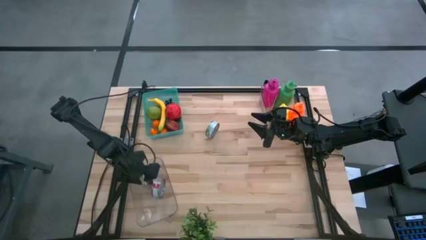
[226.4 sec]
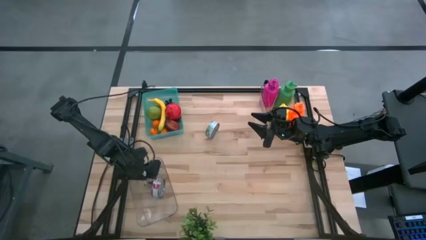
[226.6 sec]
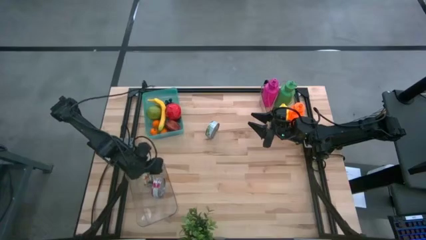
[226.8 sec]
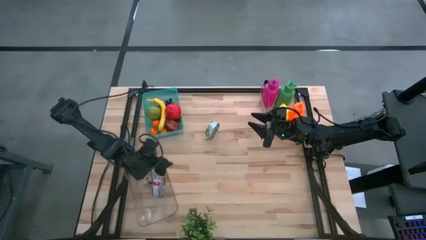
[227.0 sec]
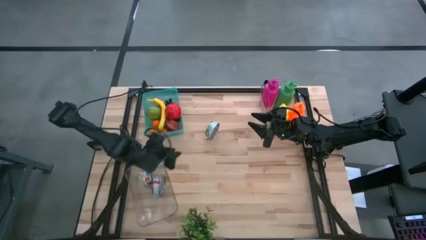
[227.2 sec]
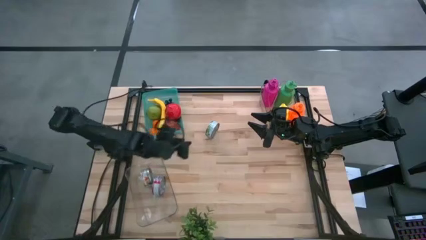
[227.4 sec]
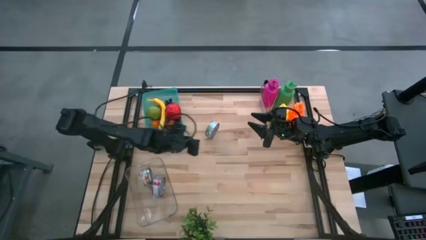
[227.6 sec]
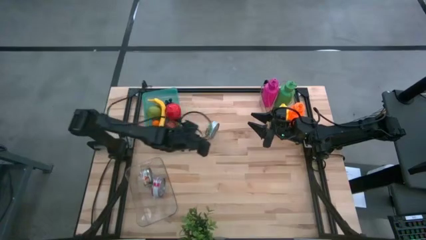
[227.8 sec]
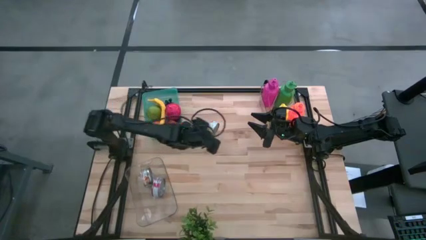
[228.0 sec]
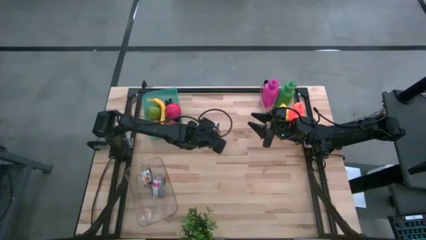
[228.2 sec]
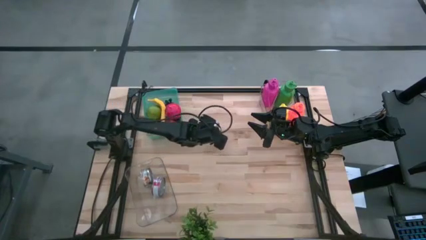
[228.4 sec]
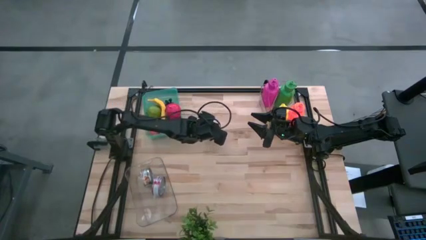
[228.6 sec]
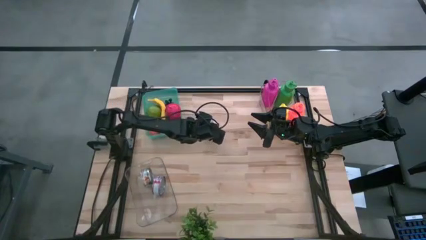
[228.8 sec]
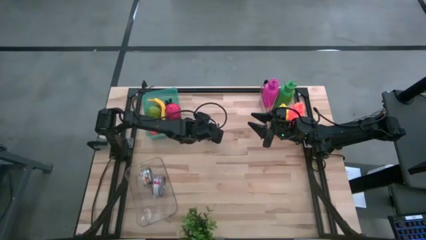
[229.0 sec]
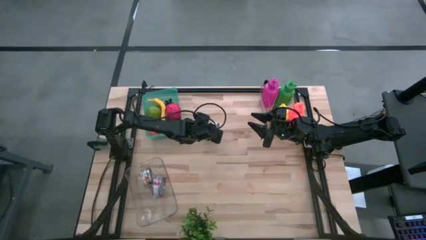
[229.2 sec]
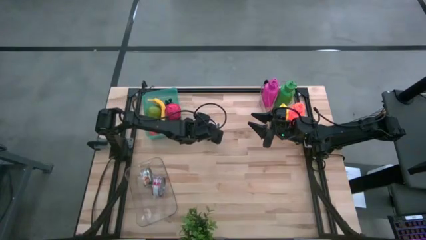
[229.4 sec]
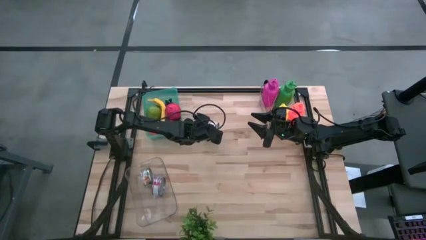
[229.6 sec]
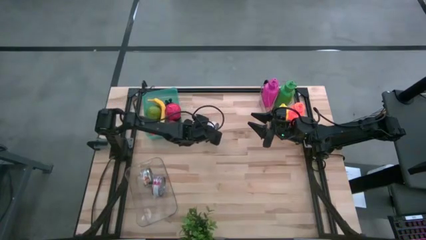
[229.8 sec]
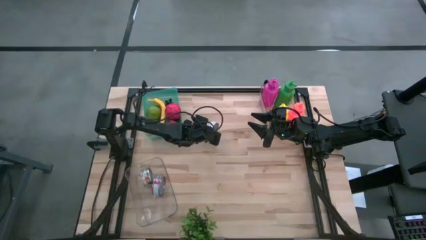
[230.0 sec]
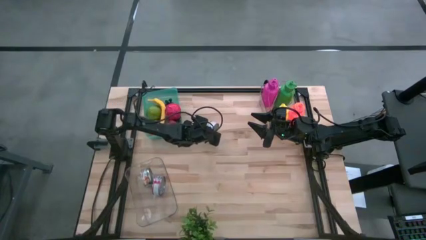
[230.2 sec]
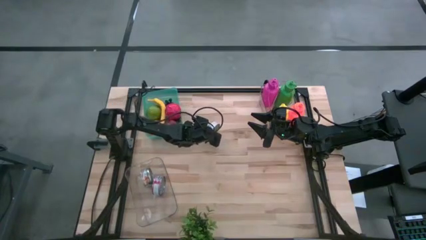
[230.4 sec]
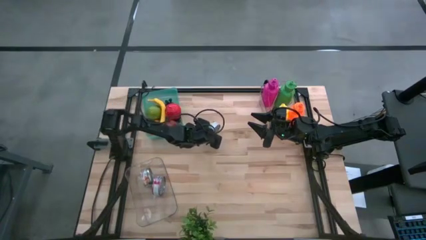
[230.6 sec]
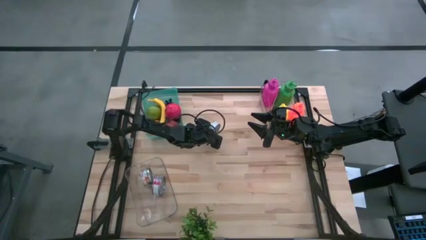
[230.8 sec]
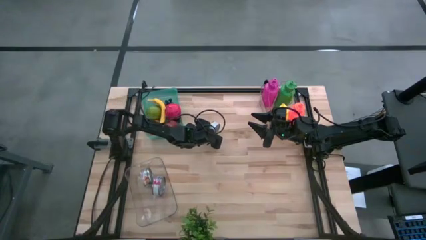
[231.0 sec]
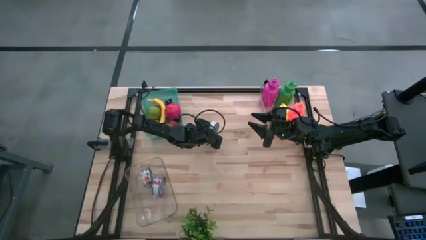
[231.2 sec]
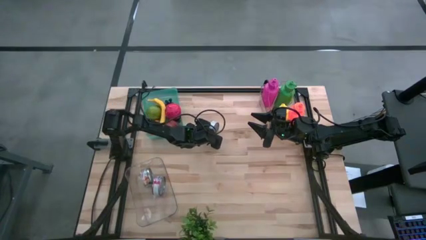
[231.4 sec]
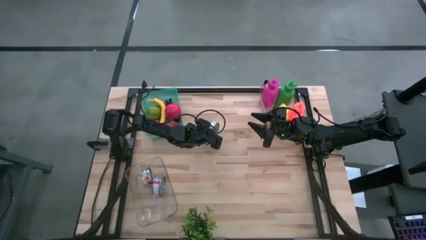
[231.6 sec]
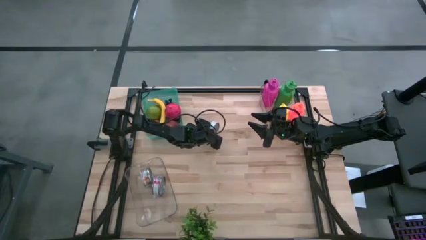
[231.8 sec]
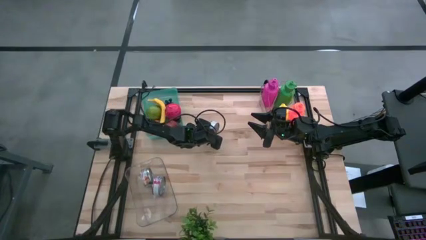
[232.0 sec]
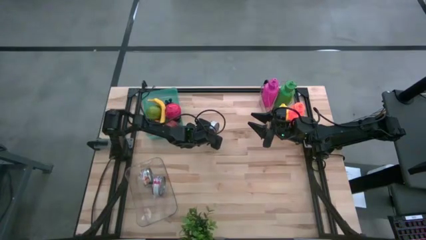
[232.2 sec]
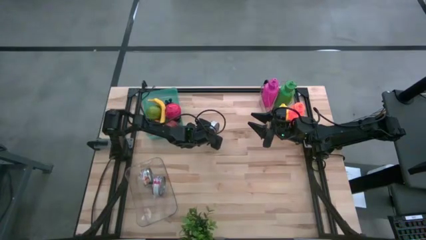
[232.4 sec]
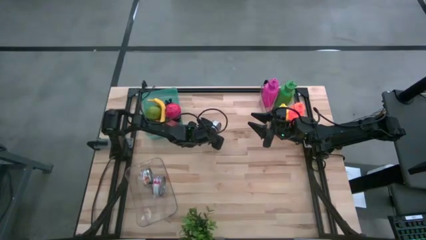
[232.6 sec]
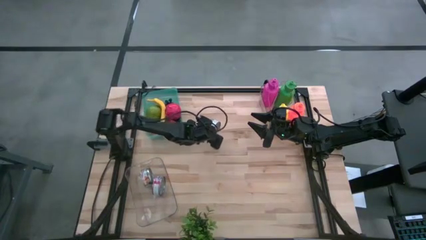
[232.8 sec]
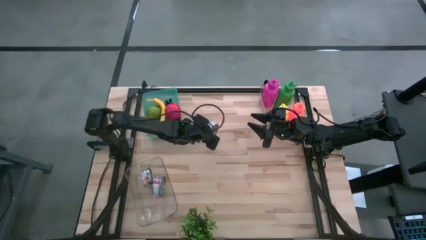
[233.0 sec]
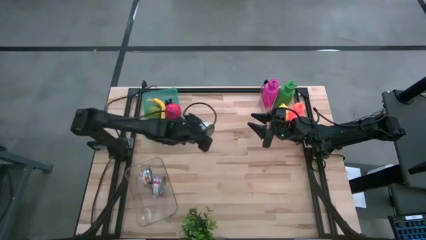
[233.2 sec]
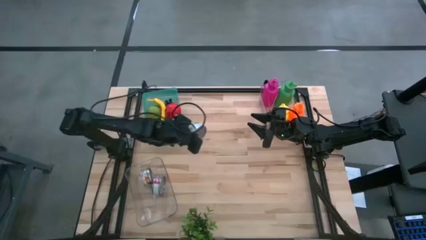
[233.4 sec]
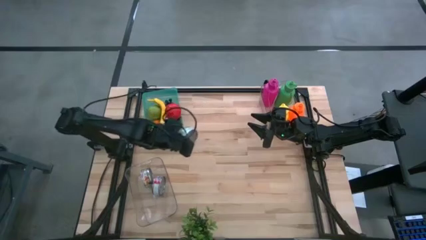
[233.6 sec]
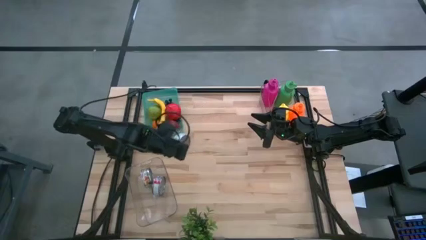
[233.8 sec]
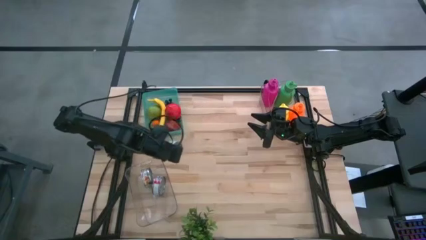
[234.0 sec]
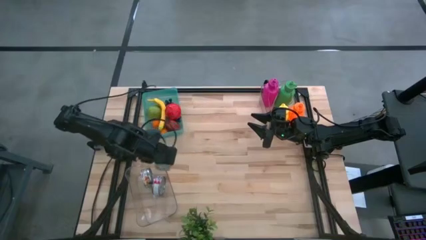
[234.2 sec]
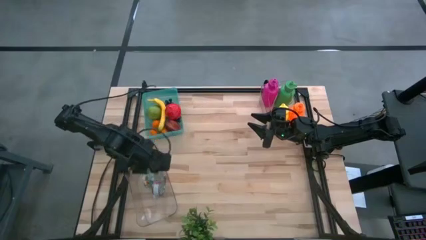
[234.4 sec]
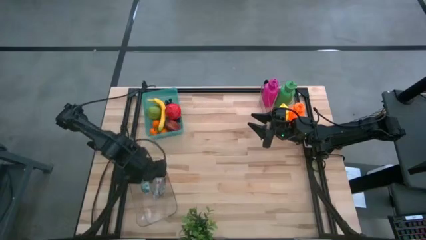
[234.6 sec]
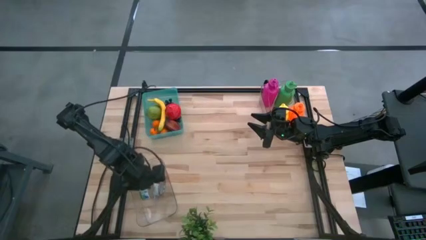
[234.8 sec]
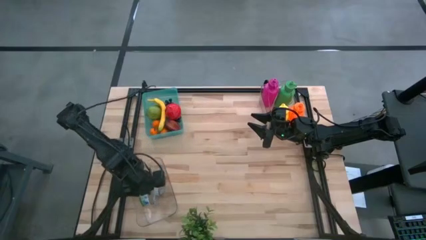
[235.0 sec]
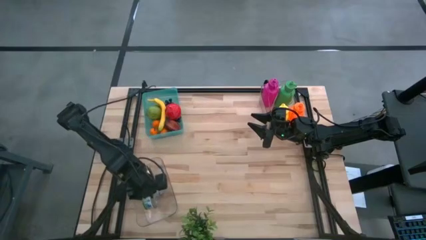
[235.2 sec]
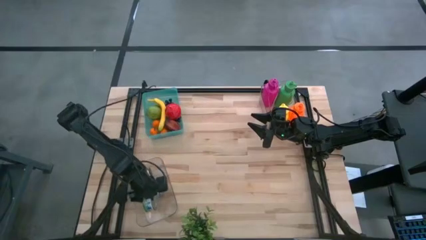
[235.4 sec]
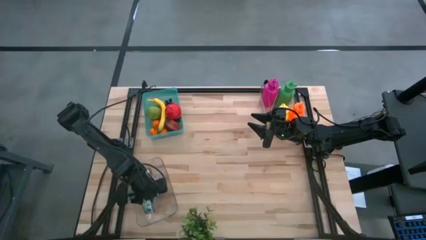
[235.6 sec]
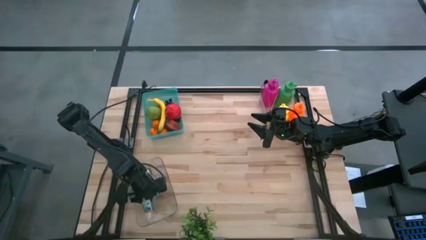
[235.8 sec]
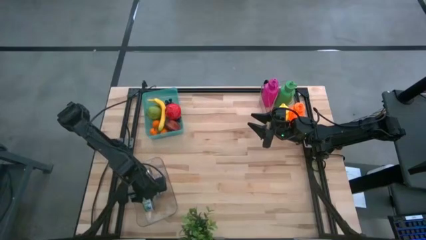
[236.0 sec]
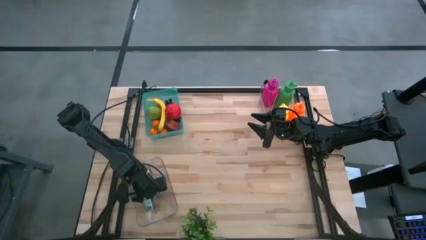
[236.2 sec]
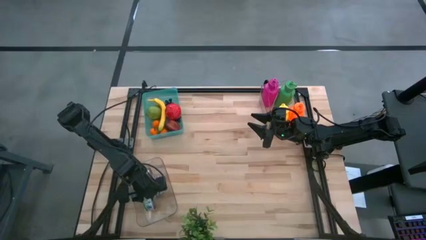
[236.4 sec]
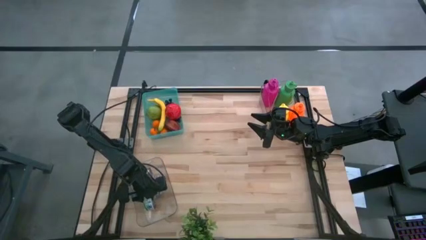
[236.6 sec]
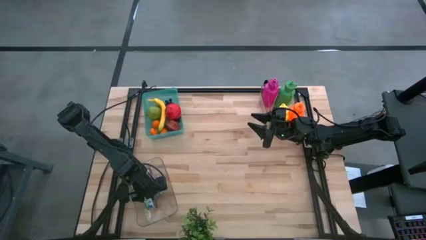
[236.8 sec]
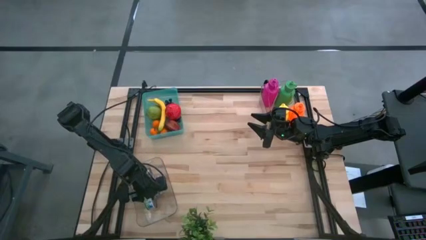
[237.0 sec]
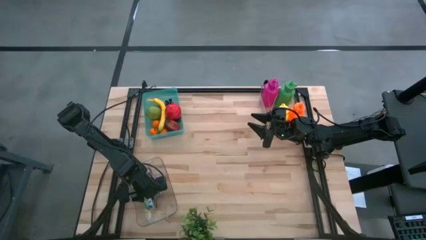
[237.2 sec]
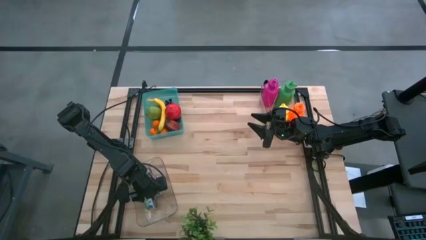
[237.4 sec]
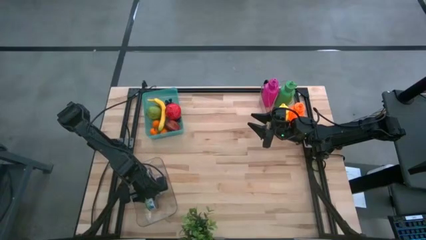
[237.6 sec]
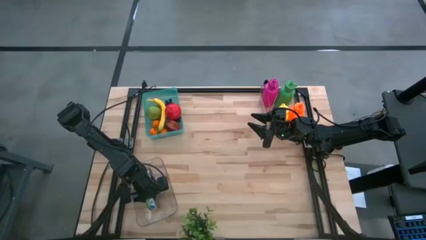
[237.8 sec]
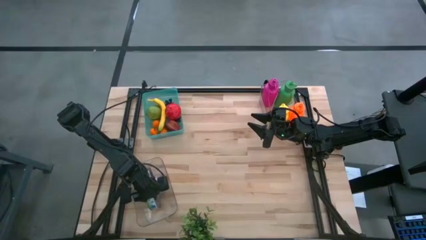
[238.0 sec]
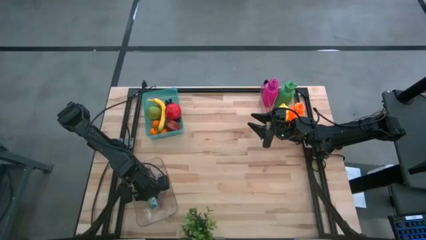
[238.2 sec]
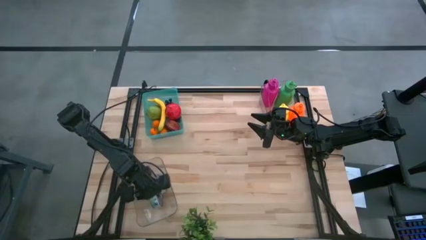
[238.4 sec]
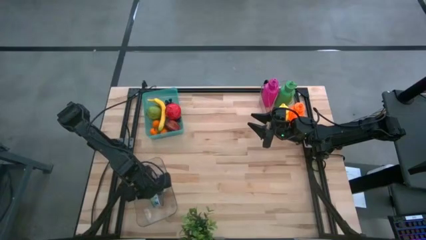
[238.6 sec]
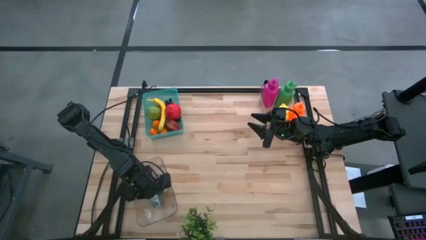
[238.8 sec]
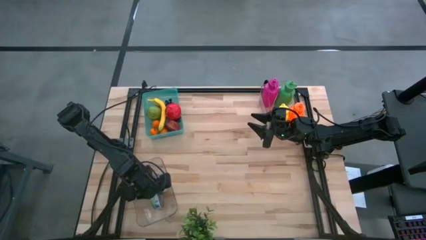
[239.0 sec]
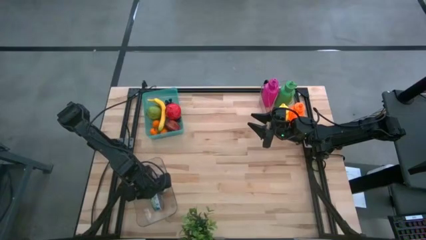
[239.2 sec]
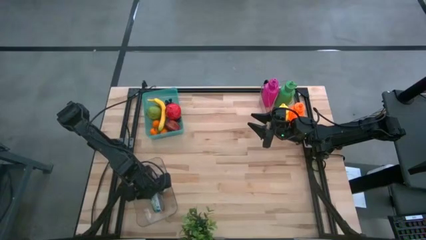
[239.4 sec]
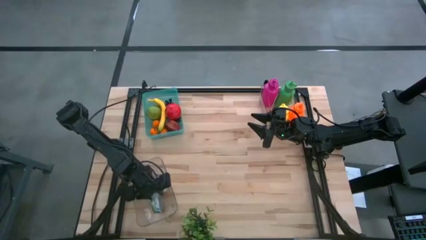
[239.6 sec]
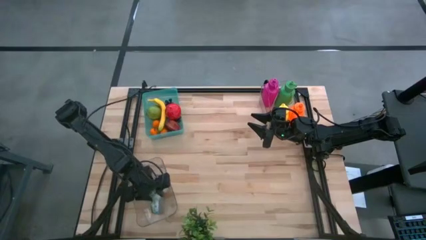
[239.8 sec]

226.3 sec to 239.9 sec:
Task: Pick & Place Food Item
Put the green tuna can into the left transparent bin
